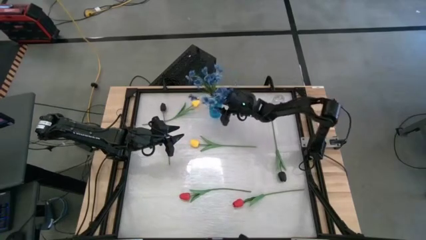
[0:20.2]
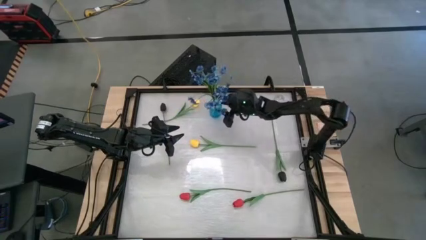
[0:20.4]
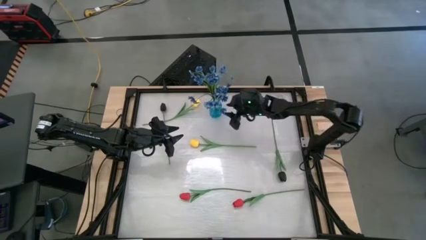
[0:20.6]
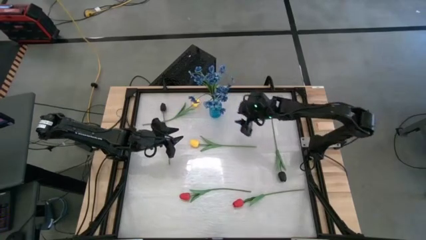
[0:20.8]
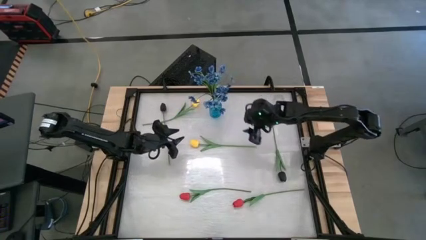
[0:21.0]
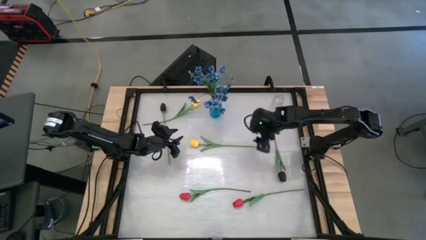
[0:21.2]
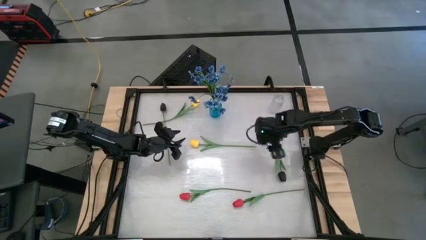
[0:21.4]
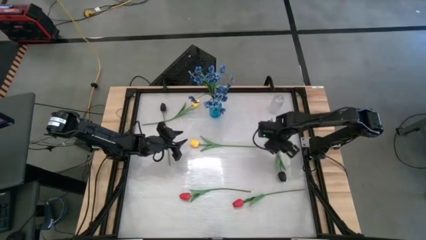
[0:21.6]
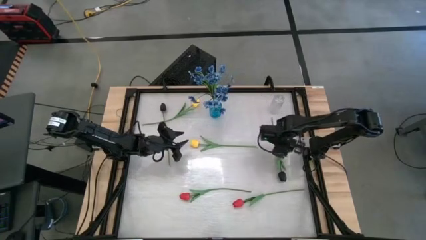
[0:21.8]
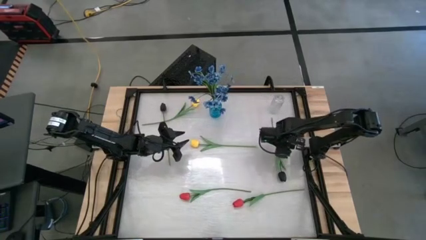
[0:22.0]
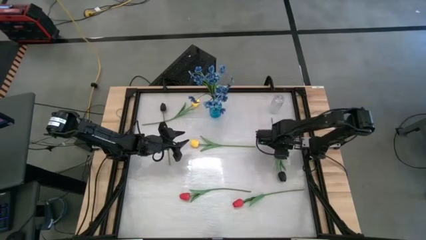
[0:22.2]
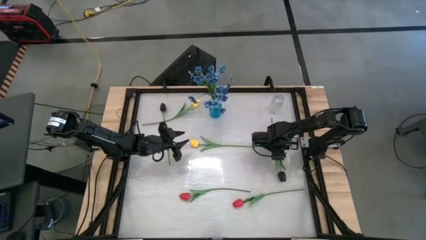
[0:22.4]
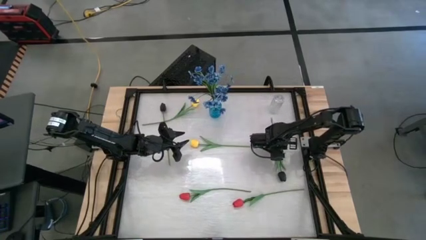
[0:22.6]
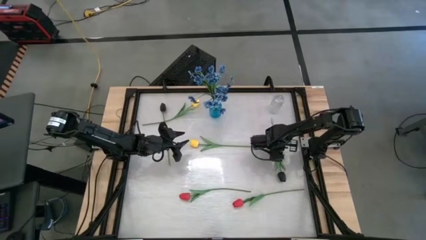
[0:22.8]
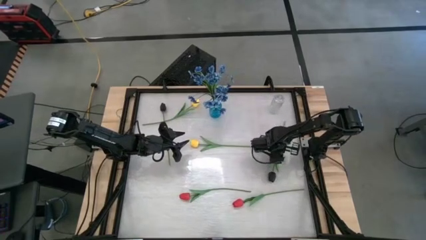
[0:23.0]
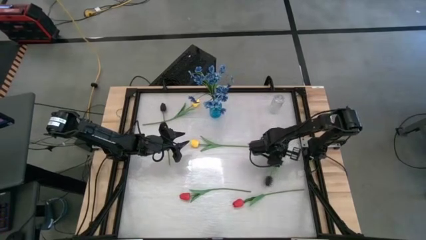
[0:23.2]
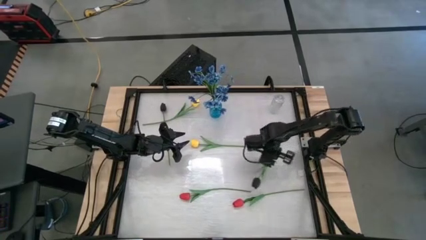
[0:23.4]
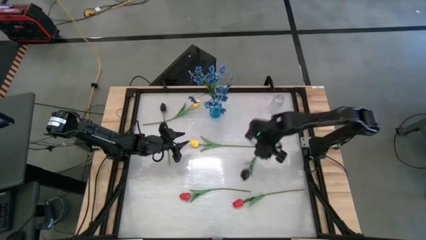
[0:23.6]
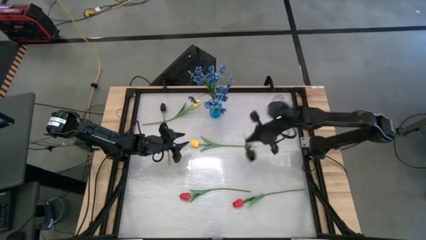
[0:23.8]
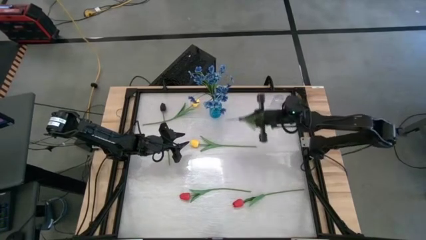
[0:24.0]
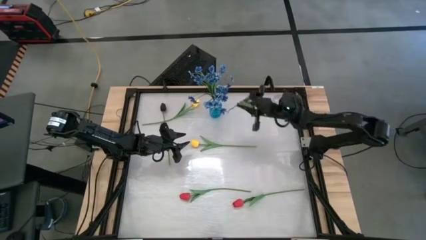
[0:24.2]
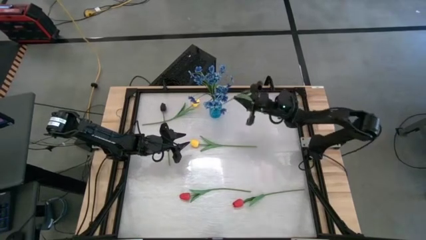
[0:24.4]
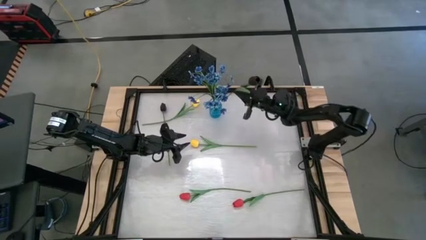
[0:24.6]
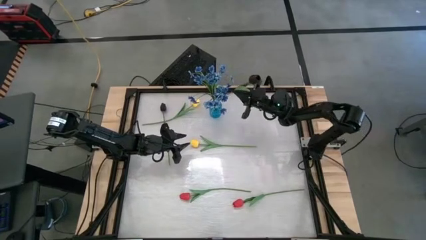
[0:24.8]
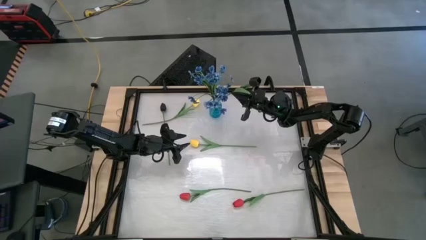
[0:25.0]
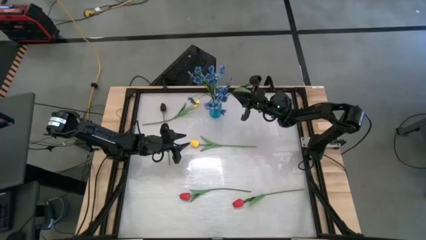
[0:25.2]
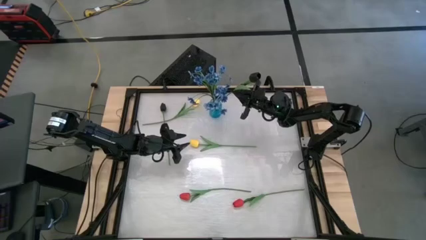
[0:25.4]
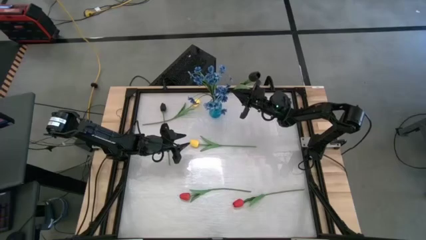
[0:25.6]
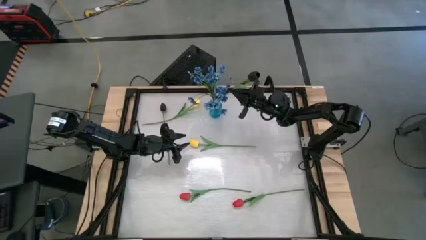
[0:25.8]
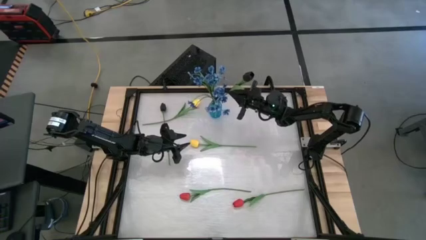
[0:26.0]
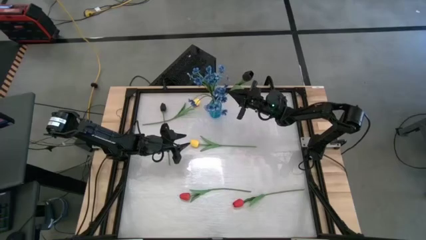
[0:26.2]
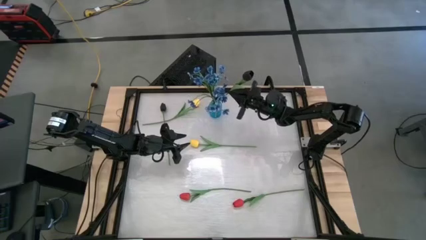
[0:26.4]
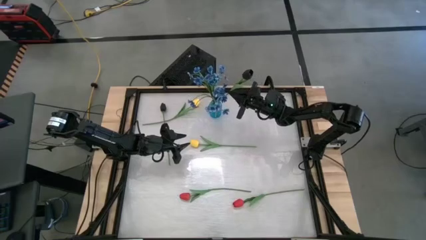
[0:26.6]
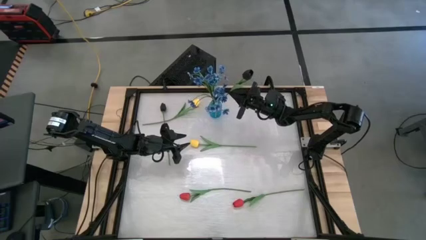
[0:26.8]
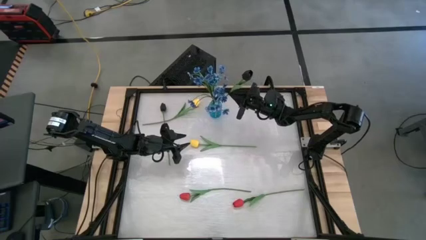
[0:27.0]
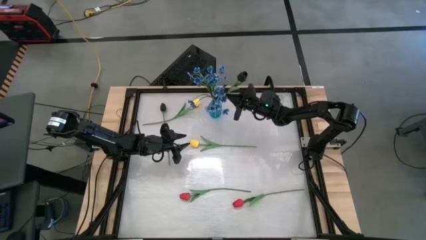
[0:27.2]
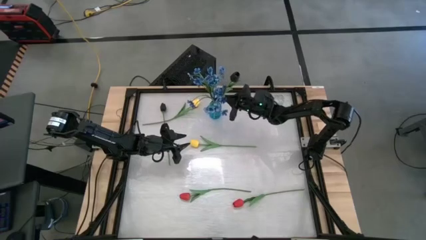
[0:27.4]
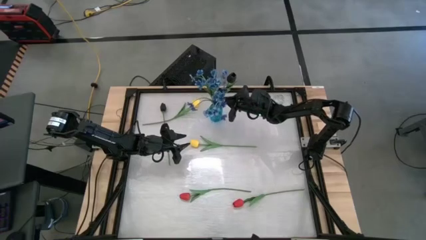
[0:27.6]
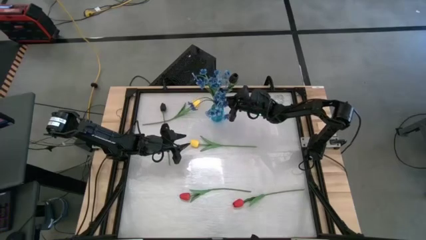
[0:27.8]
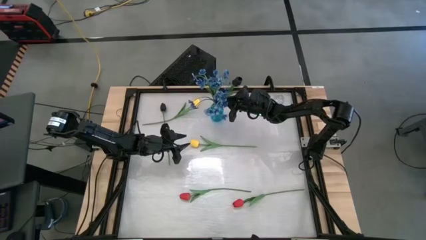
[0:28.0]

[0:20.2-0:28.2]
Task: Sort flowers into vase by color
Put the bottom black flower into the blue vase

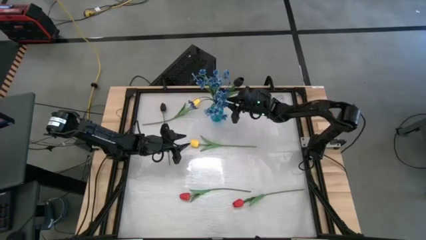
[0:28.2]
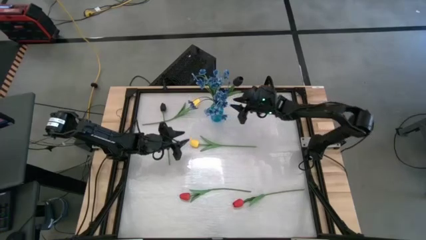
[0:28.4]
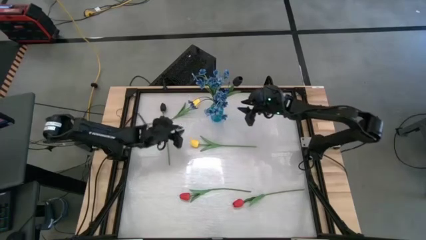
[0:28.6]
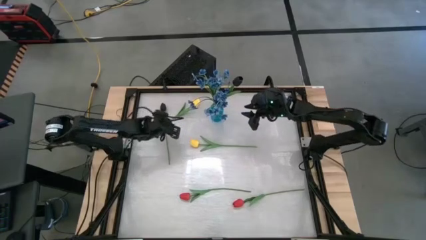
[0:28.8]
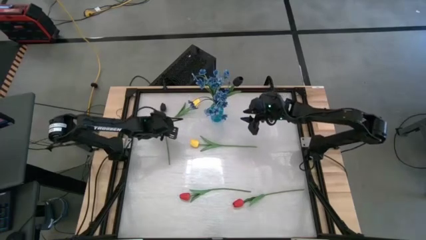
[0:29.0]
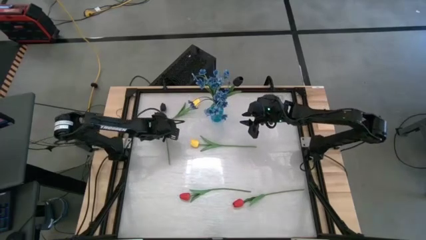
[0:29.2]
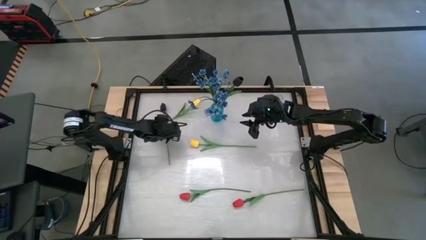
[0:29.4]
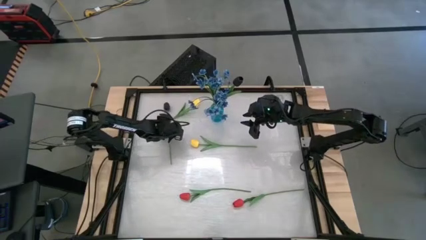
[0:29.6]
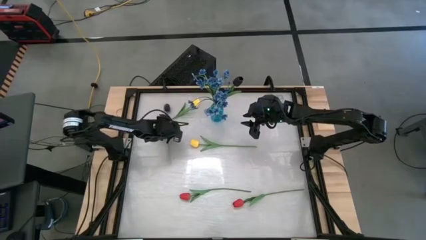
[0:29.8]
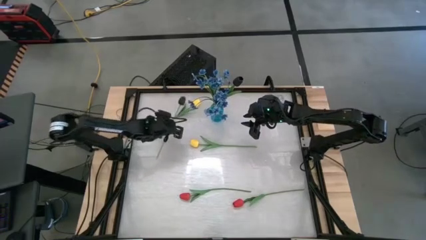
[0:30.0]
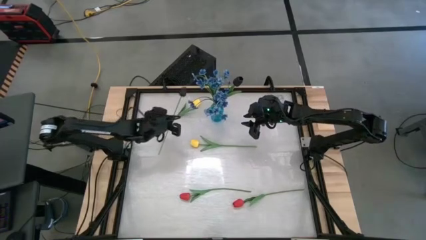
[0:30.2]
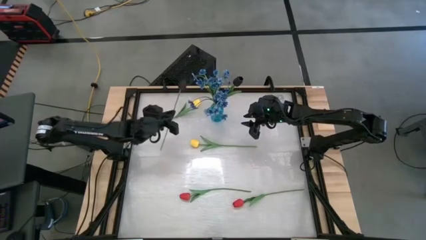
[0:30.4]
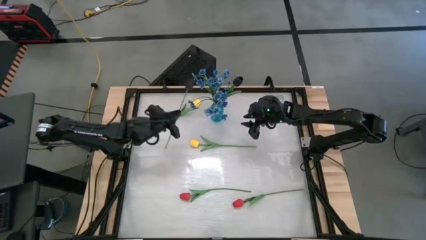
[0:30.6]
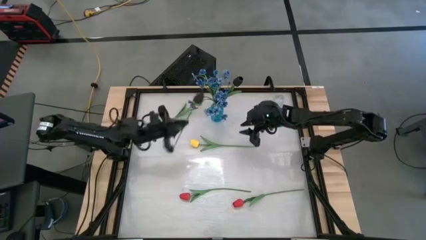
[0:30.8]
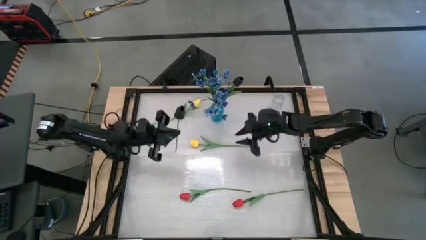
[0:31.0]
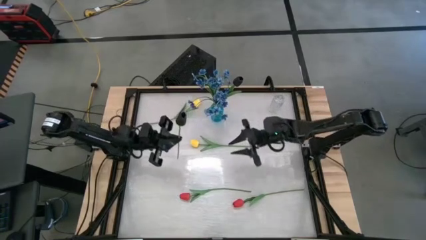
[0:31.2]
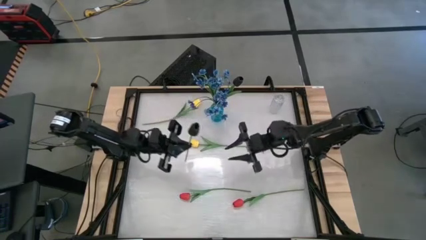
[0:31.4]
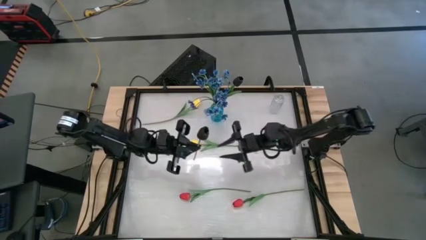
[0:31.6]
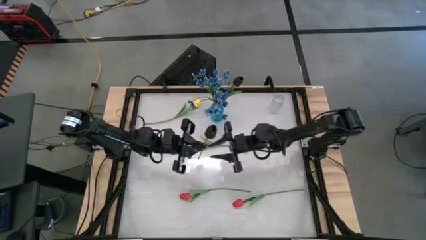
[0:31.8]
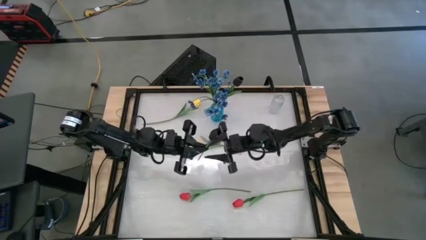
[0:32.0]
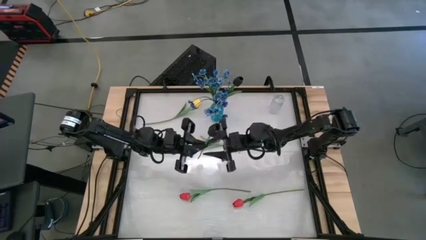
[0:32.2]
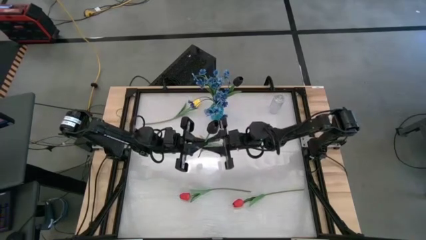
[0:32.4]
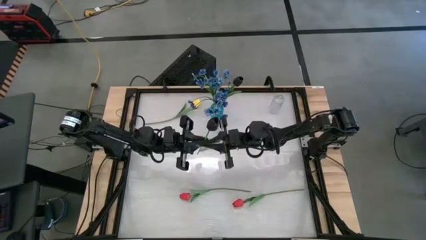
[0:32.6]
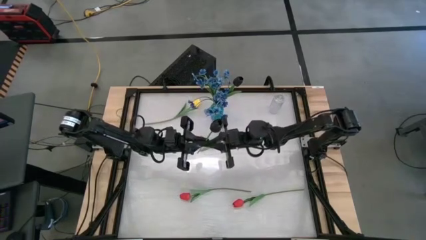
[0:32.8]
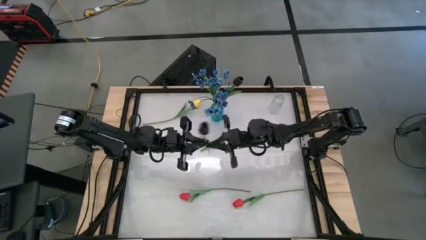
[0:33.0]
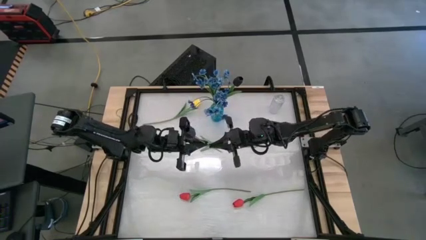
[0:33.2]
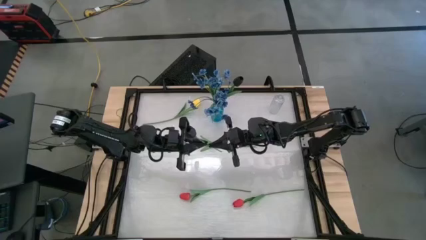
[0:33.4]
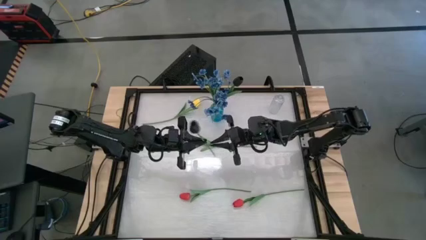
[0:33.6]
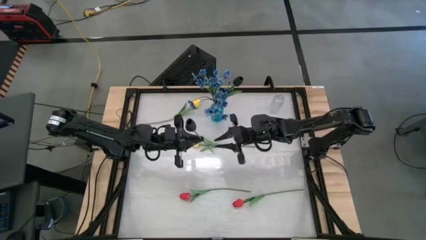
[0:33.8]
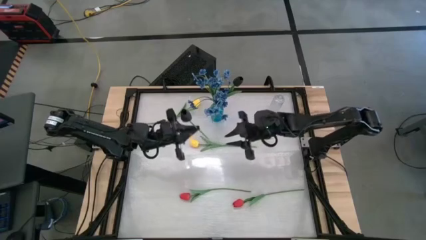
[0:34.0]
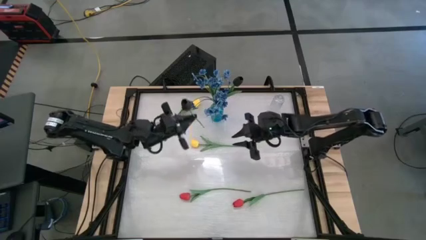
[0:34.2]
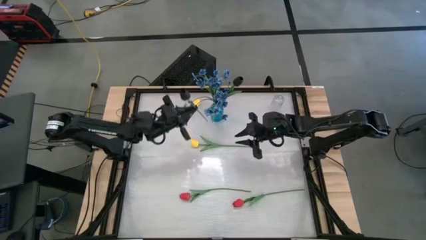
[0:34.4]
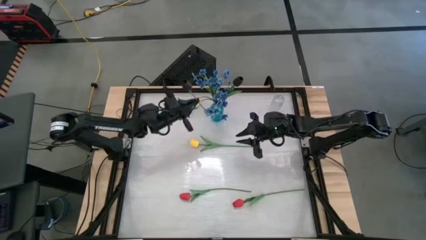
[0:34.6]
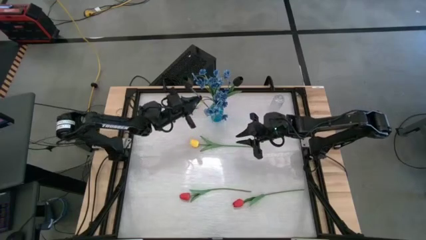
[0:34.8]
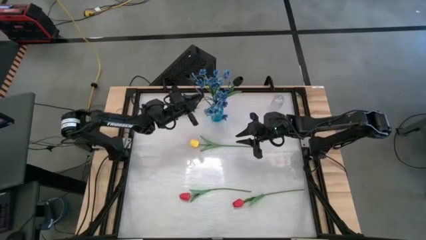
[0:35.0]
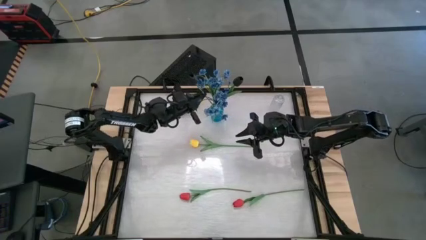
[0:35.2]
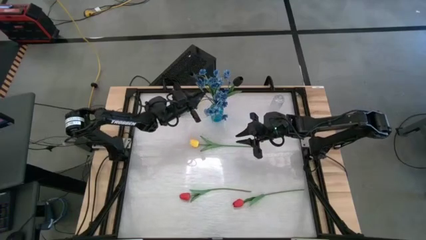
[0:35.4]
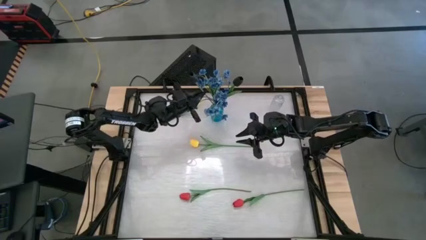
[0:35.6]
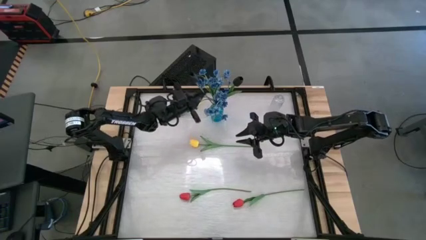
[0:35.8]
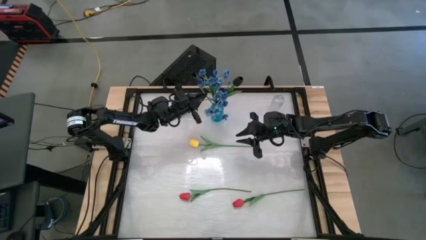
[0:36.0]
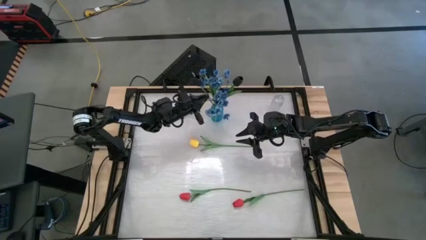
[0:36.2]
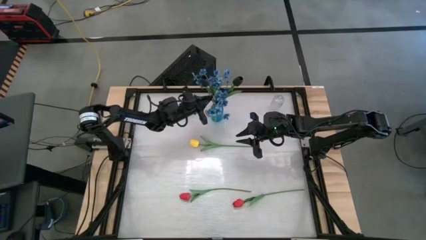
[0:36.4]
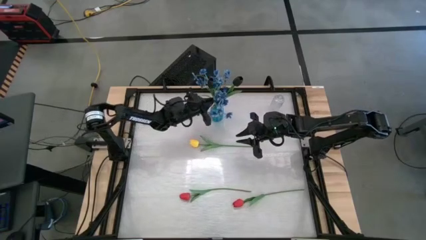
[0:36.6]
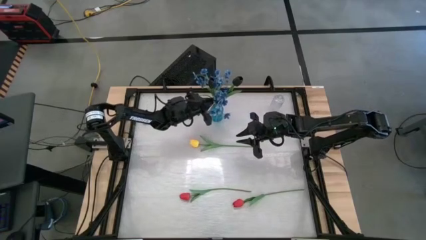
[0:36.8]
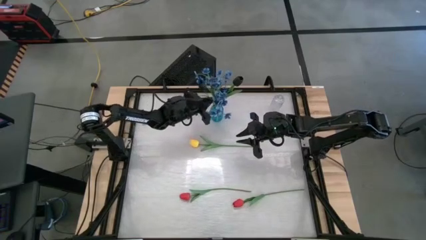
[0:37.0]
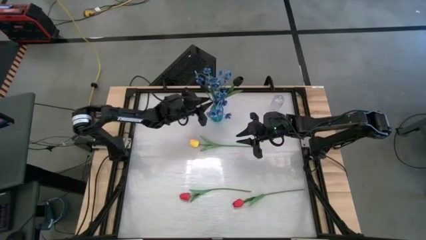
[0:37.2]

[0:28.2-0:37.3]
Put the black flower into the blue vase

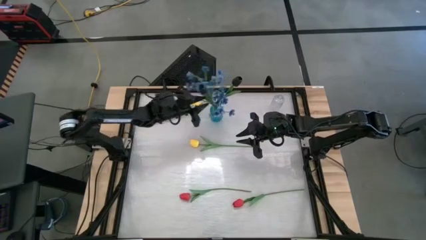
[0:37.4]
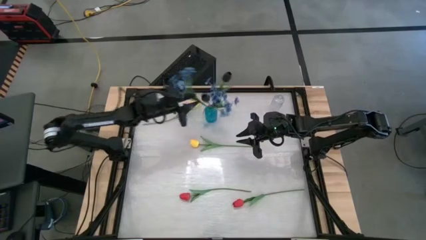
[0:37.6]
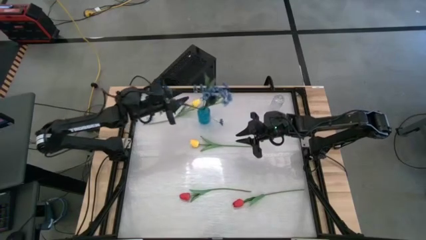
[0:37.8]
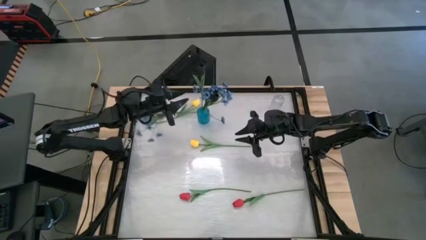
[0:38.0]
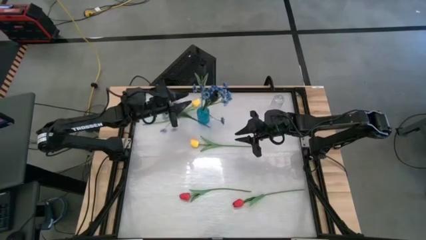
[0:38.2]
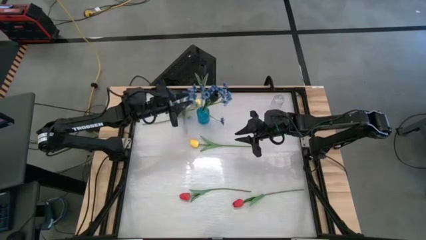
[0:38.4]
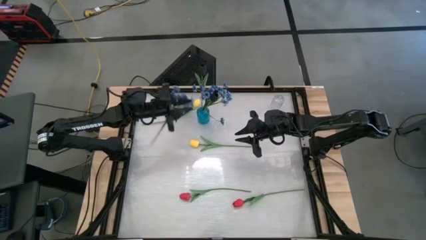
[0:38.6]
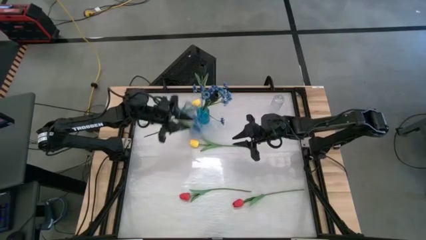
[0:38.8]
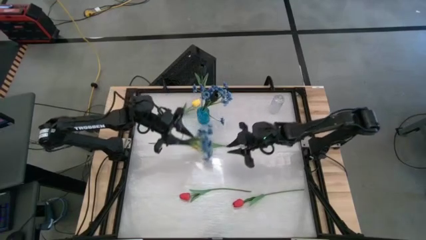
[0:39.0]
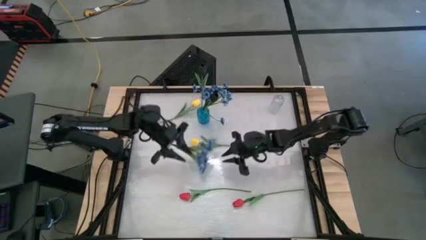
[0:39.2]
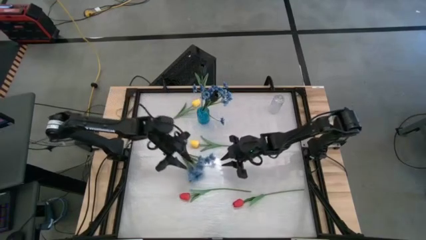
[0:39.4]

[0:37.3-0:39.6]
Put the blue flowers into the blue vase
